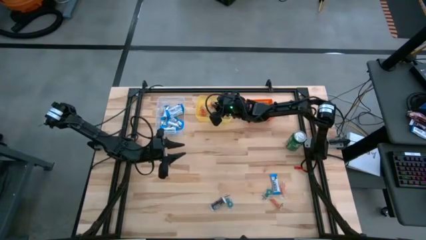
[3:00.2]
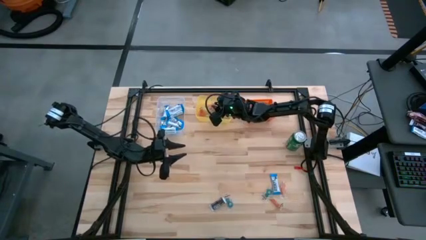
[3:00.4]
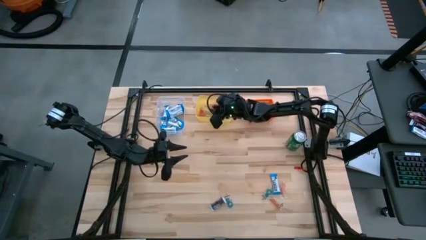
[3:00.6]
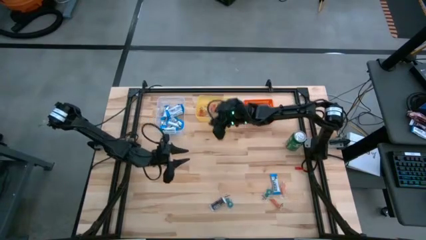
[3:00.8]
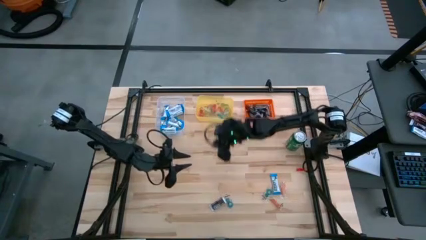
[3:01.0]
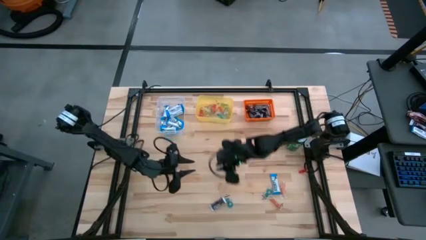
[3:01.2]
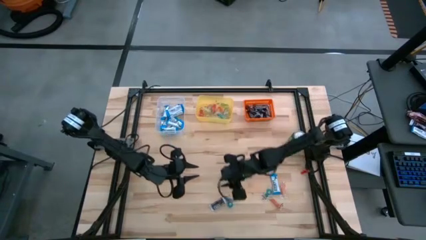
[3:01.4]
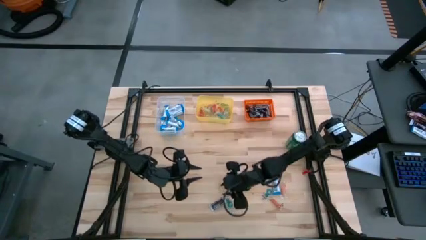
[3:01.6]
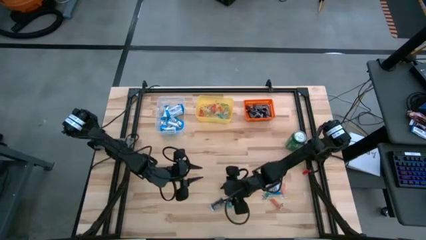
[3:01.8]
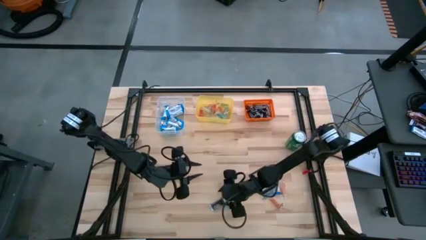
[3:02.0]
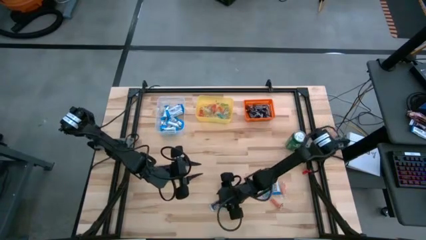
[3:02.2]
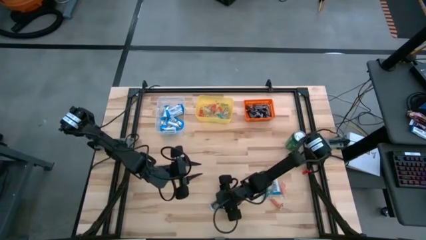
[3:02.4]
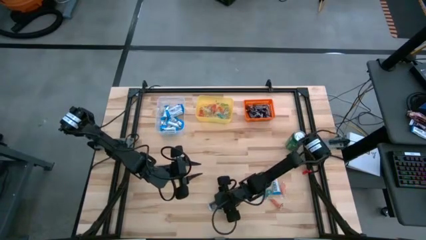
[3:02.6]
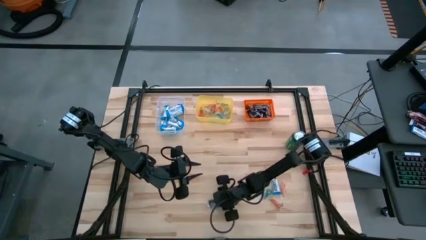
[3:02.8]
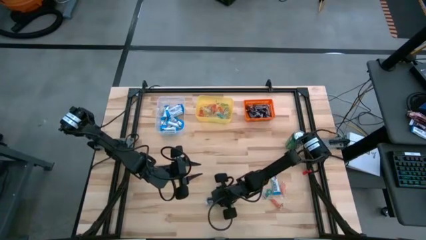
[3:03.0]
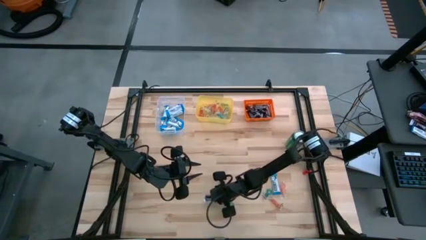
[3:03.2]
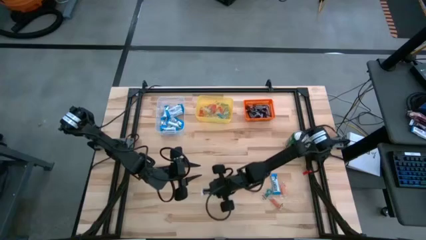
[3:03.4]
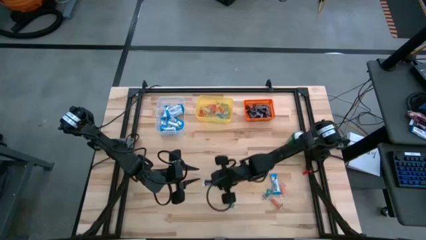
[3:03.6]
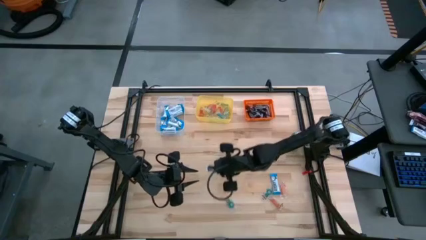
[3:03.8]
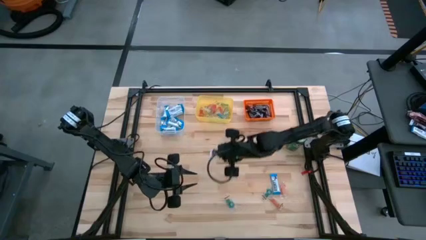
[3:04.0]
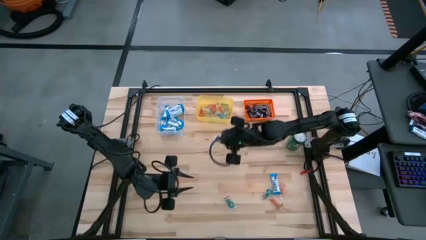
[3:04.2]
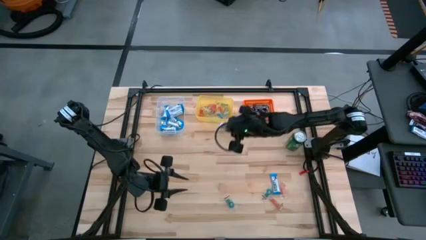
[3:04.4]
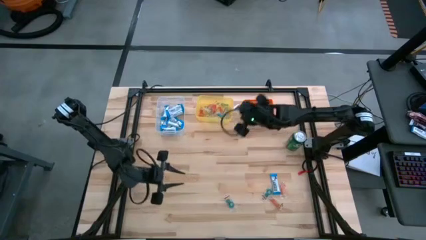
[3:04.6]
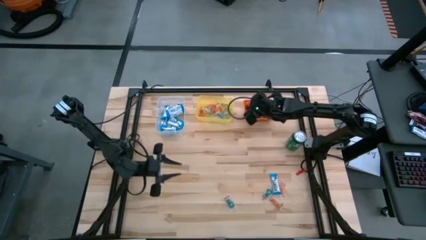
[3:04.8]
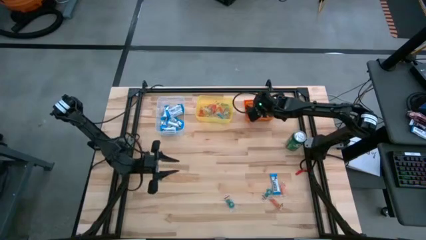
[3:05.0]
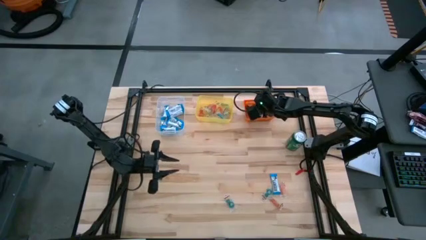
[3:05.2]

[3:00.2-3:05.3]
Task: Sort candy
Put the black chocolate into the orange bin

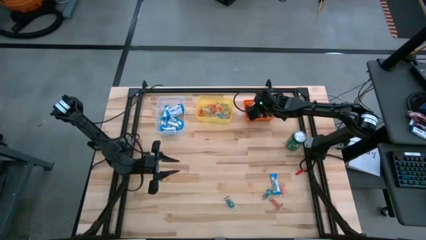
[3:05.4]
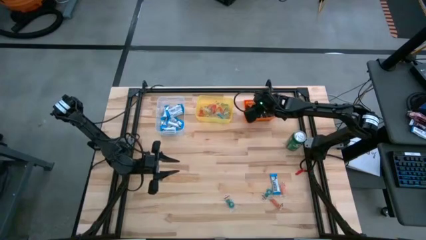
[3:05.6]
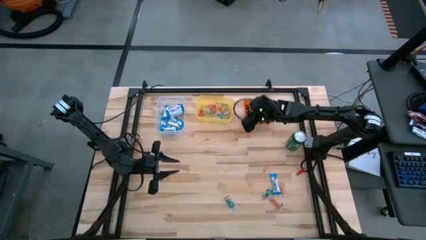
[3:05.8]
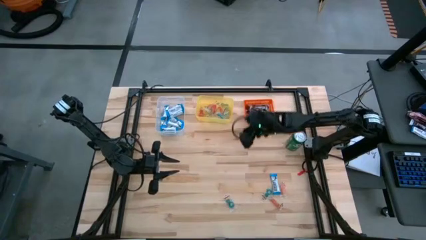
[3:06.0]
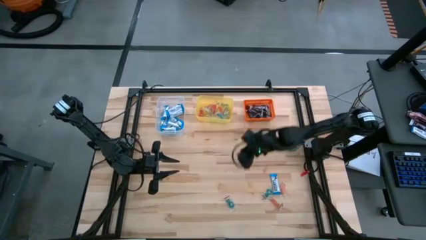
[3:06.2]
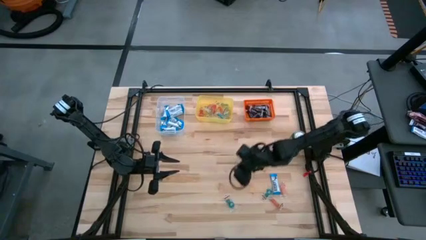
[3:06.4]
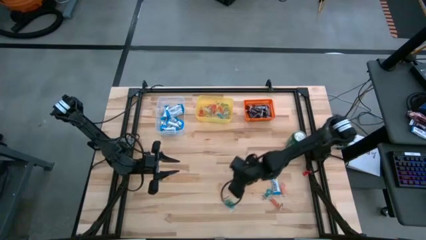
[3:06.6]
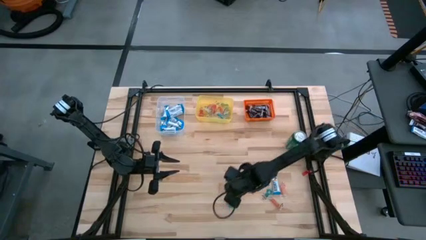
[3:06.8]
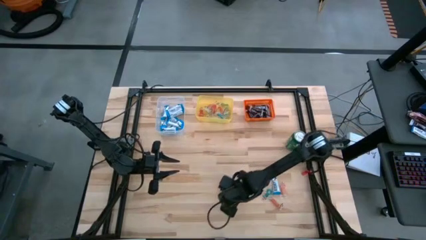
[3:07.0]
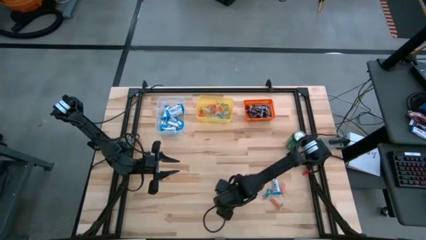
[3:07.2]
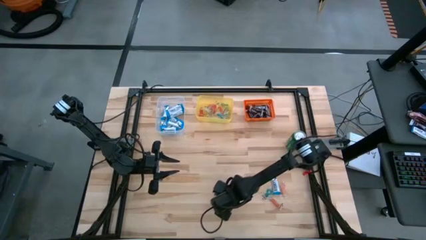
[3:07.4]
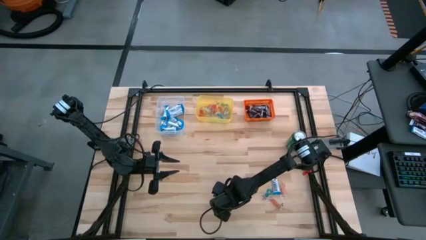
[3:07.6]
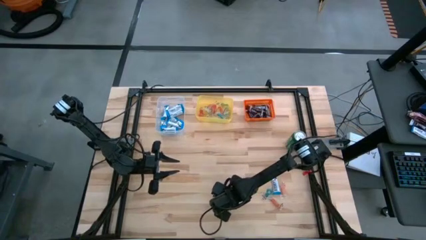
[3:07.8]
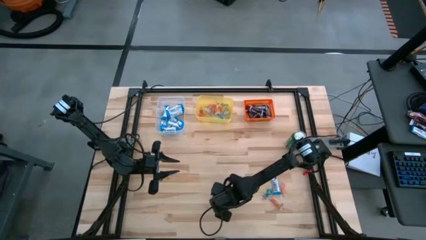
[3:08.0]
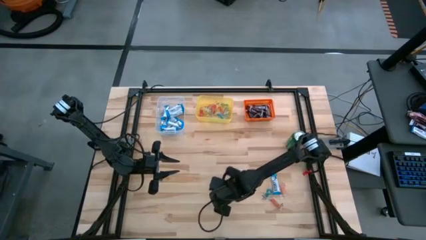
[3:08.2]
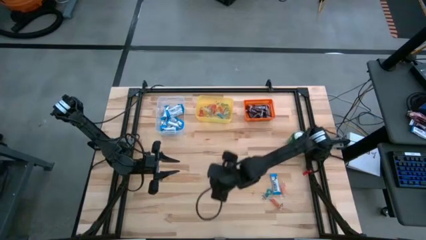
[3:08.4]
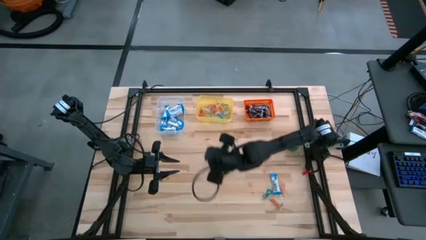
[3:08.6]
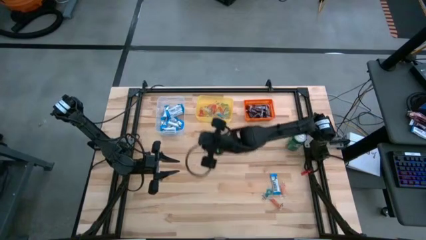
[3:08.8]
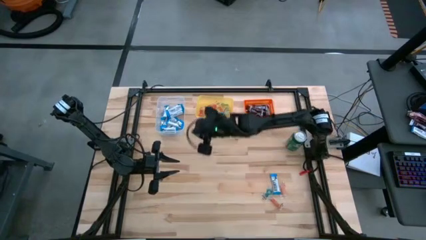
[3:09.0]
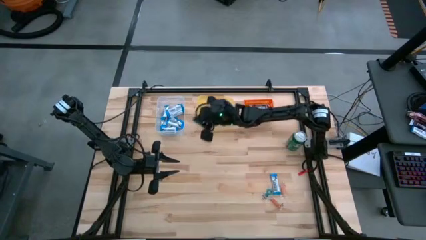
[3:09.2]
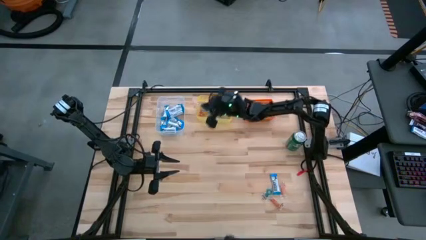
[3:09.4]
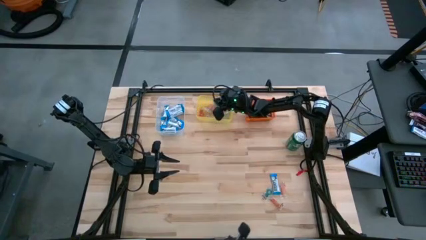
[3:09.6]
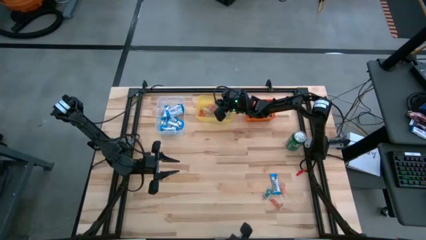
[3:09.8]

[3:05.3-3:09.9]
Put the blue gummy into the yellow bin

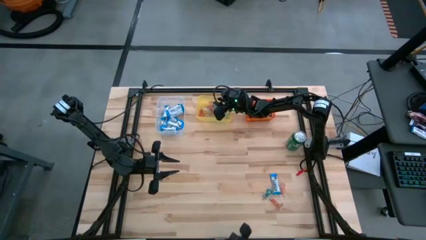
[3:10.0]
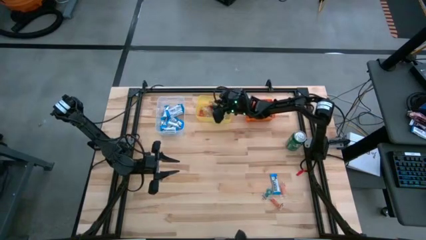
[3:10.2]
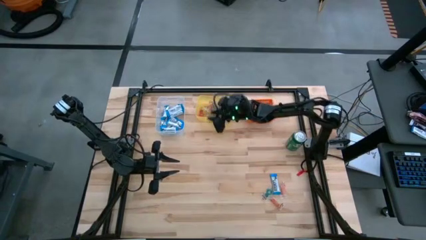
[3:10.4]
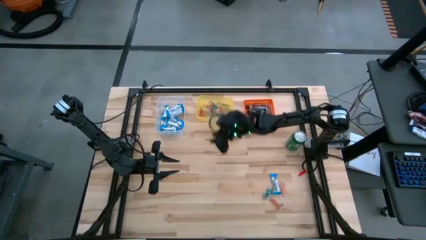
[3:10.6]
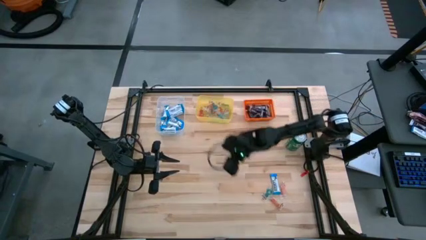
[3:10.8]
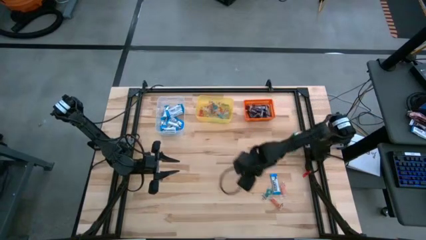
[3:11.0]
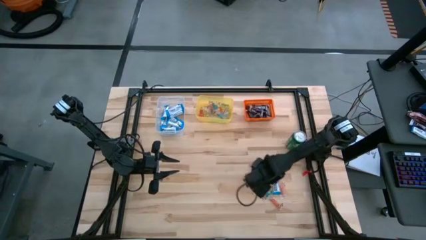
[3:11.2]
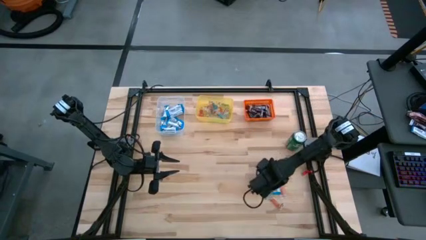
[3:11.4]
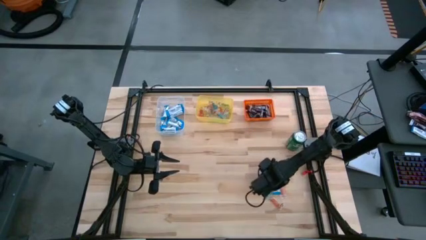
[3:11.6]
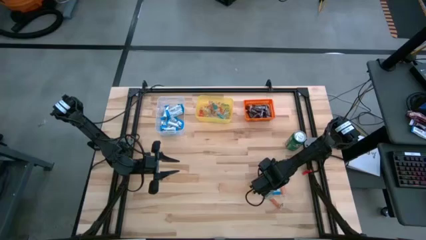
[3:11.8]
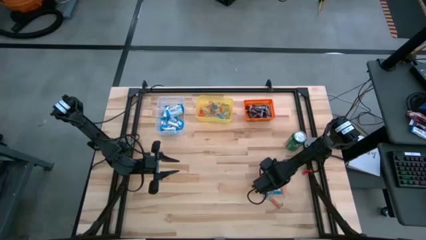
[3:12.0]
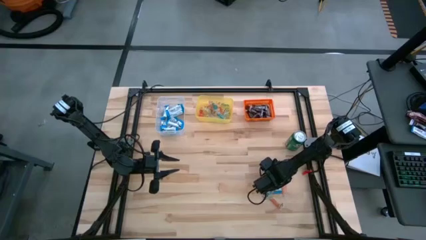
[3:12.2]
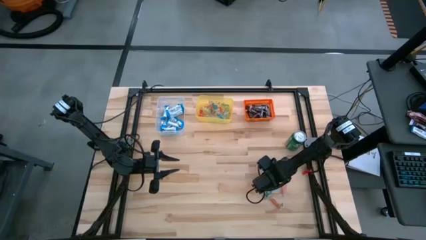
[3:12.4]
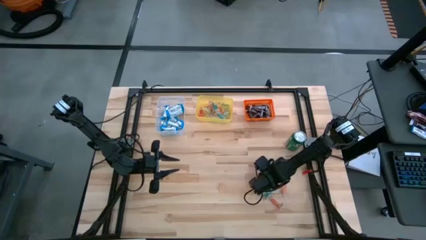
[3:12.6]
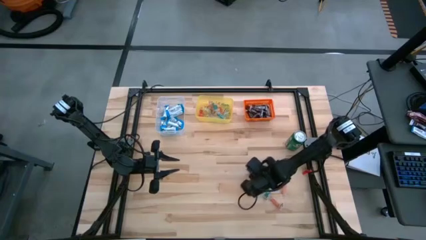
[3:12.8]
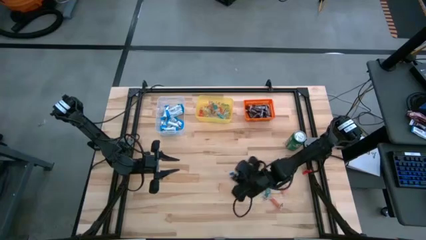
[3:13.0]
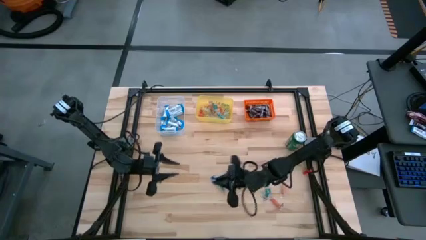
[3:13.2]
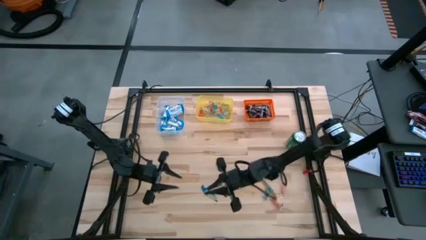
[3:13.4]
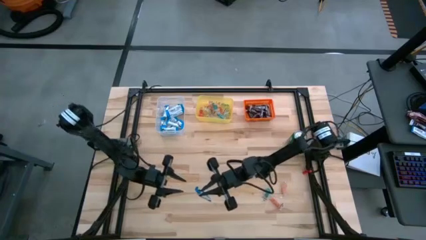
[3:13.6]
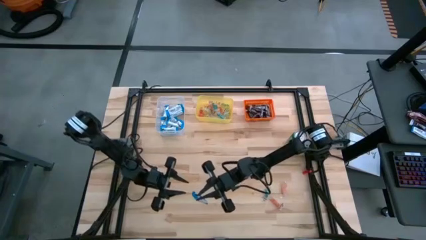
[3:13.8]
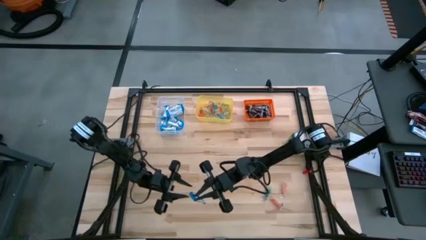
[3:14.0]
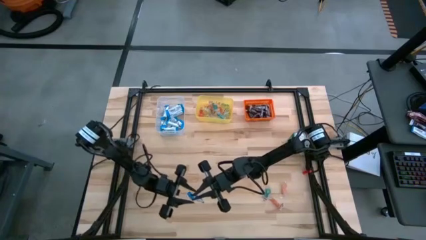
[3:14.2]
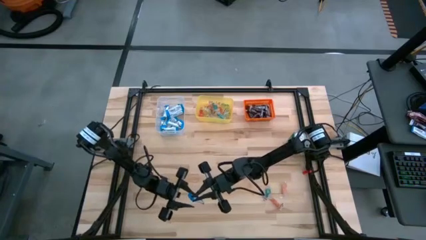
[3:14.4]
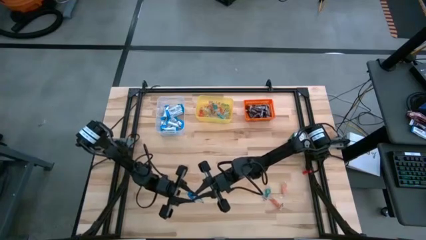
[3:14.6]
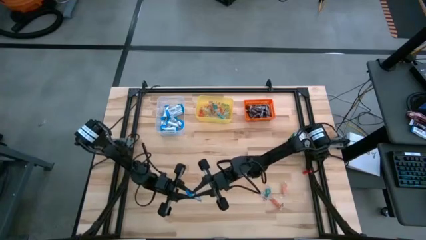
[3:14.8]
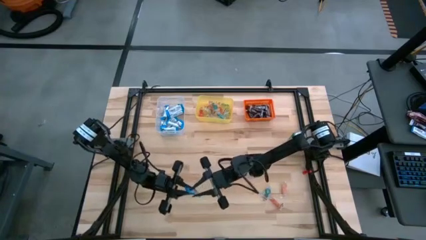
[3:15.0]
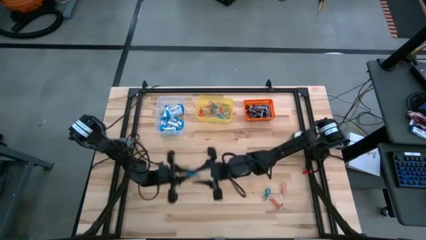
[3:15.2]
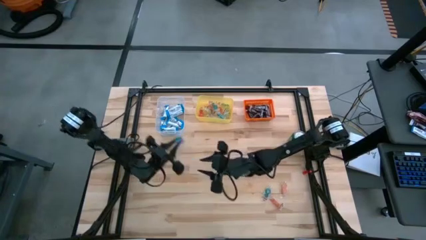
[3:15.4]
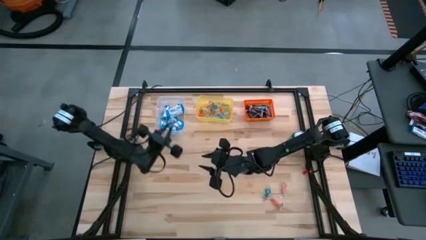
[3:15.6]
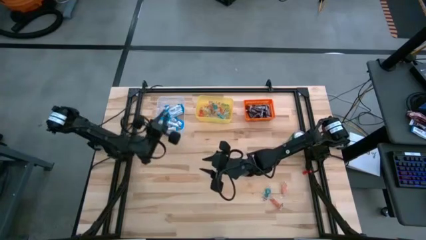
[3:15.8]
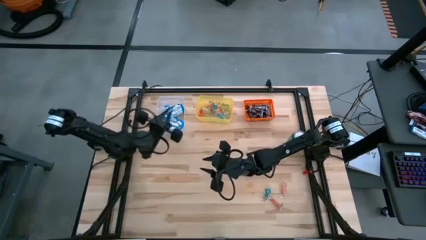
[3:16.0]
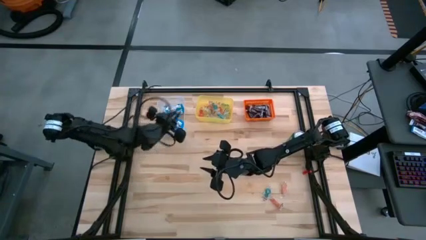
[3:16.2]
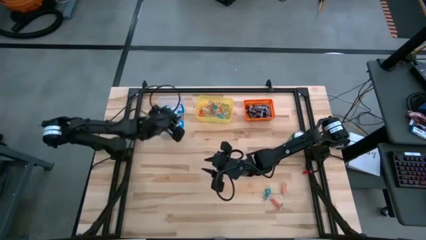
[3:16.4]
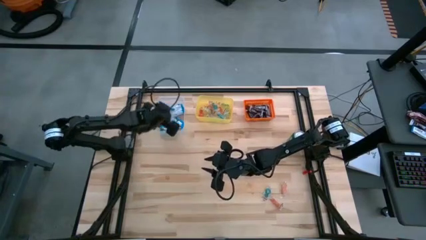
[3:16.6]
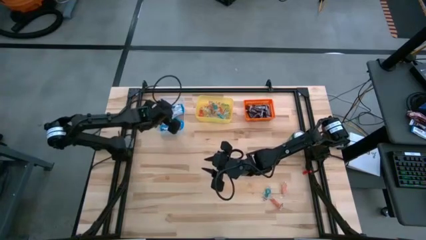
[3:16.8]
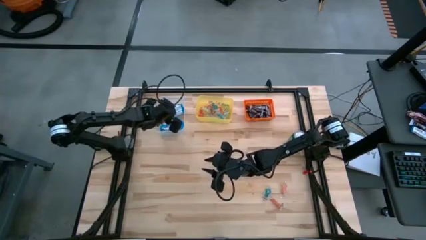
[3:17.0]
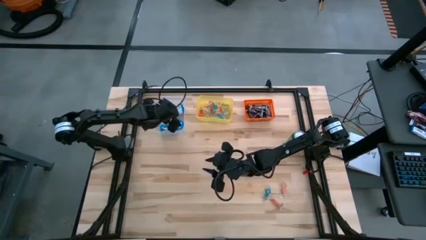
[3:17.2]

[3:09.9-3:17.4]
Put the white chocolate into the transparent bin
